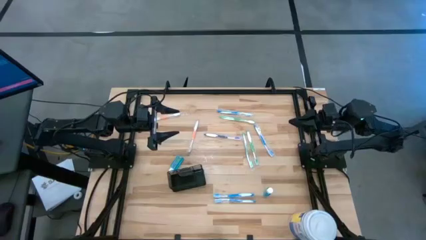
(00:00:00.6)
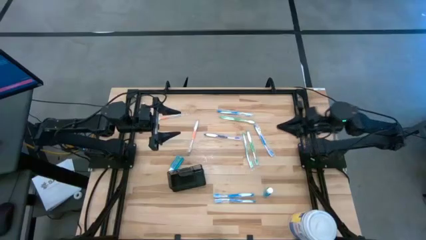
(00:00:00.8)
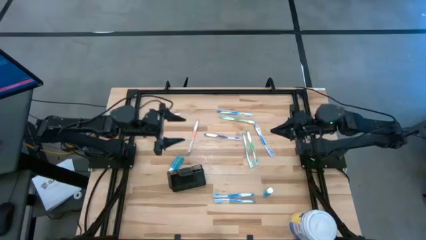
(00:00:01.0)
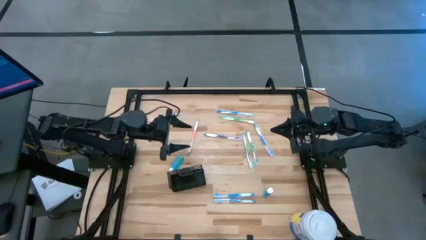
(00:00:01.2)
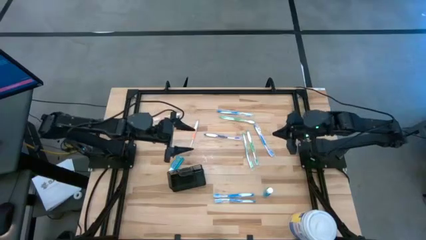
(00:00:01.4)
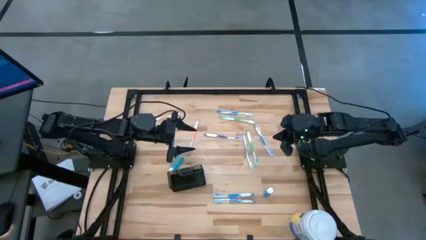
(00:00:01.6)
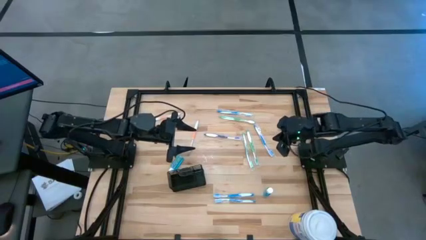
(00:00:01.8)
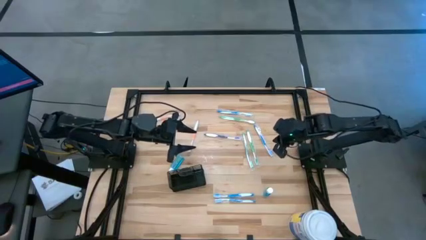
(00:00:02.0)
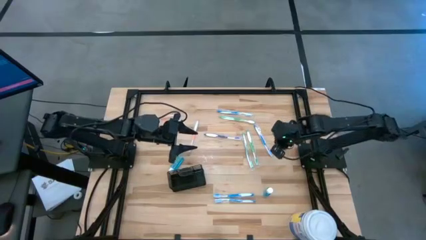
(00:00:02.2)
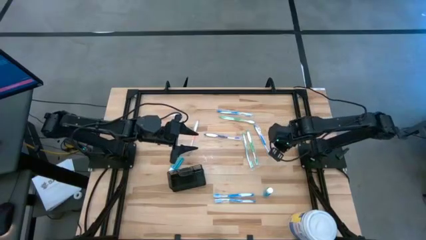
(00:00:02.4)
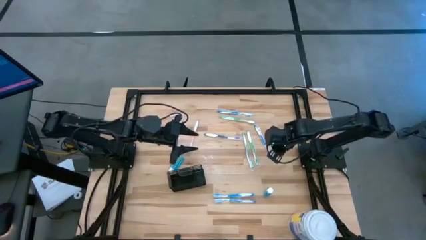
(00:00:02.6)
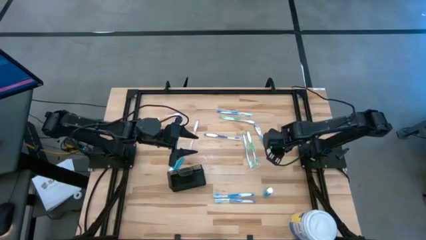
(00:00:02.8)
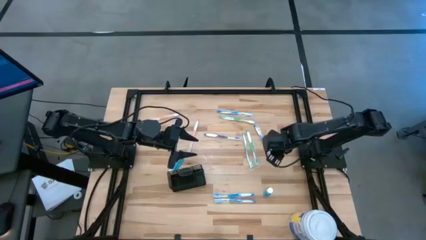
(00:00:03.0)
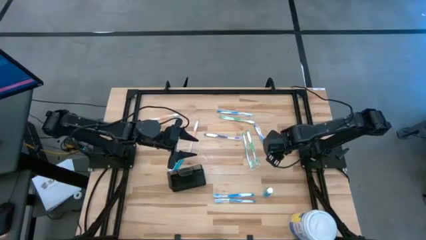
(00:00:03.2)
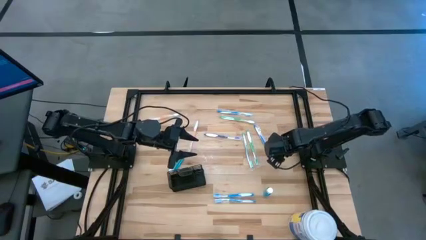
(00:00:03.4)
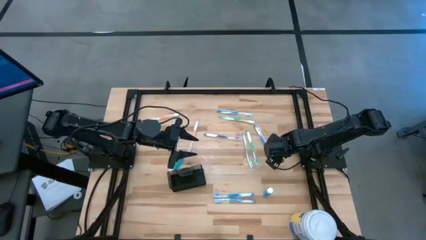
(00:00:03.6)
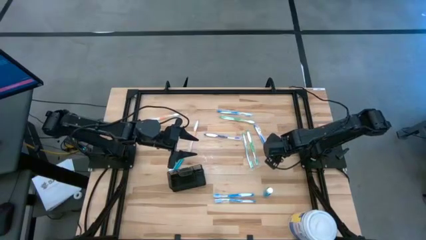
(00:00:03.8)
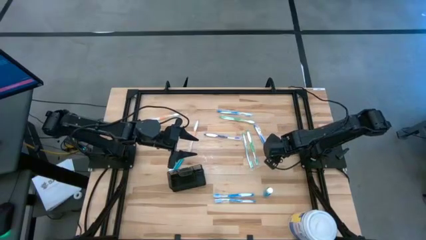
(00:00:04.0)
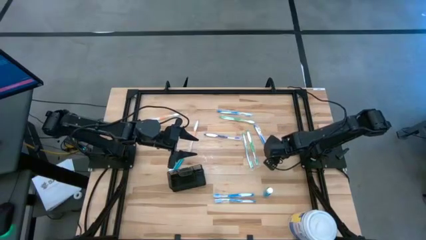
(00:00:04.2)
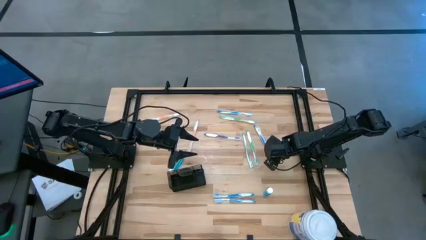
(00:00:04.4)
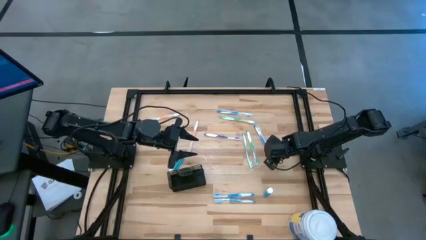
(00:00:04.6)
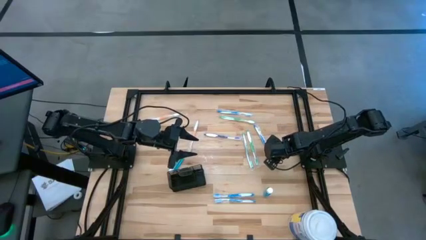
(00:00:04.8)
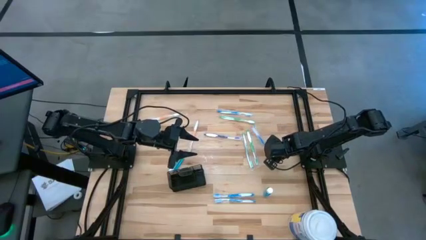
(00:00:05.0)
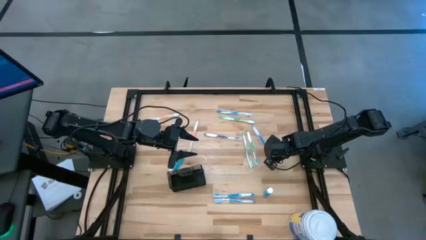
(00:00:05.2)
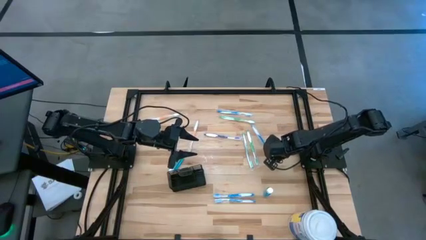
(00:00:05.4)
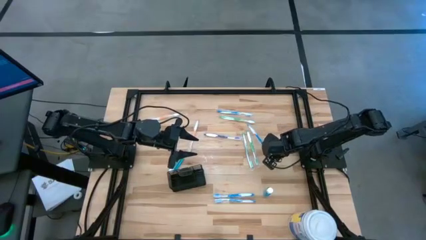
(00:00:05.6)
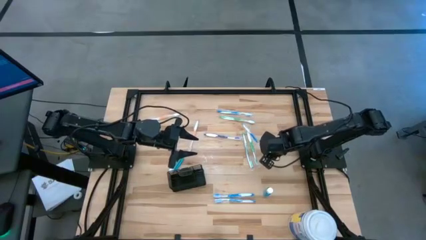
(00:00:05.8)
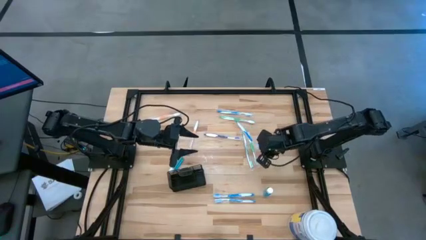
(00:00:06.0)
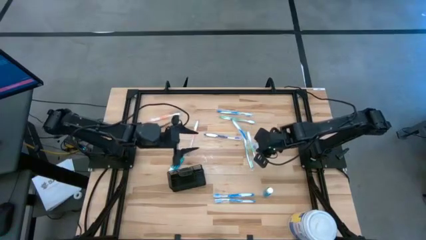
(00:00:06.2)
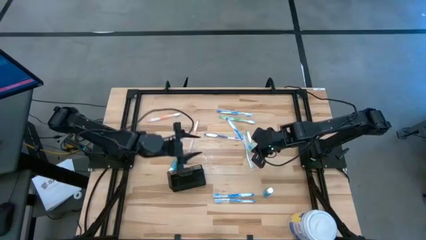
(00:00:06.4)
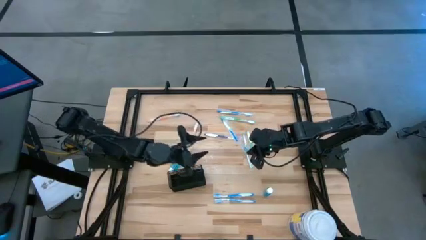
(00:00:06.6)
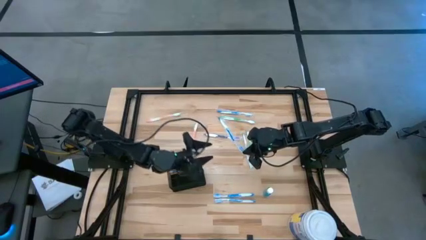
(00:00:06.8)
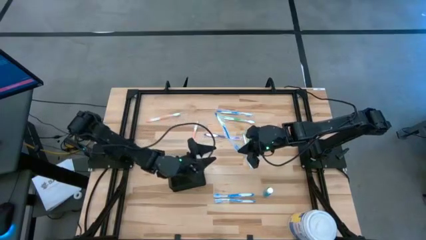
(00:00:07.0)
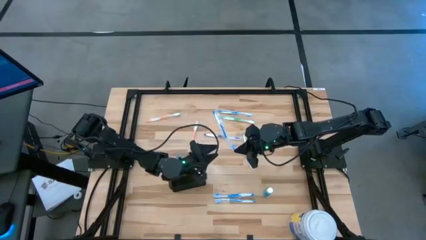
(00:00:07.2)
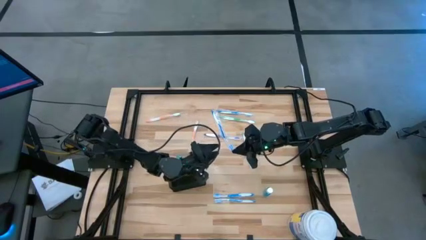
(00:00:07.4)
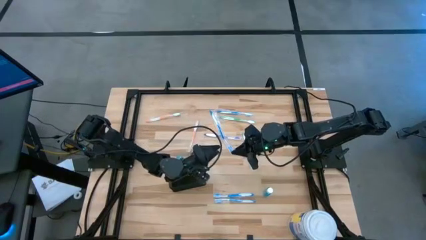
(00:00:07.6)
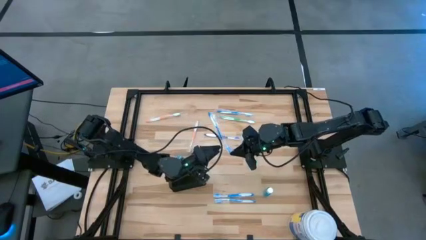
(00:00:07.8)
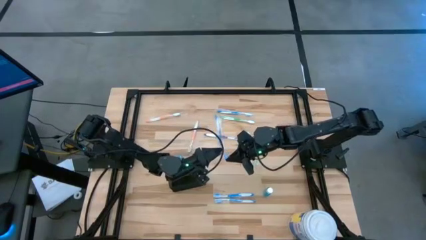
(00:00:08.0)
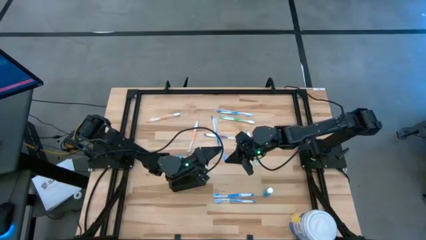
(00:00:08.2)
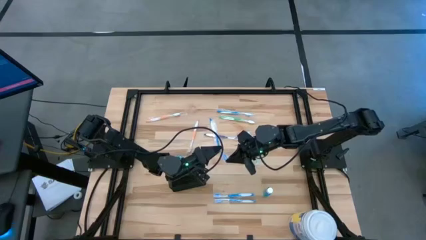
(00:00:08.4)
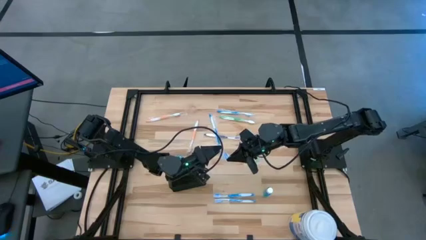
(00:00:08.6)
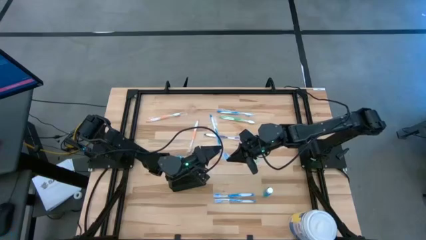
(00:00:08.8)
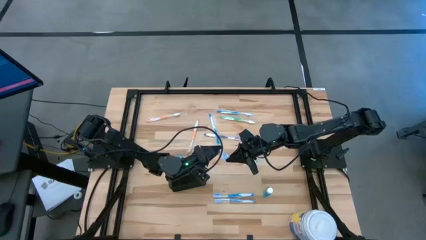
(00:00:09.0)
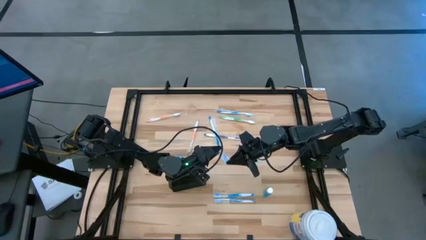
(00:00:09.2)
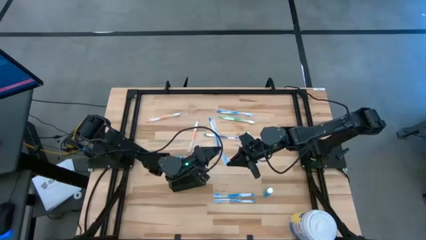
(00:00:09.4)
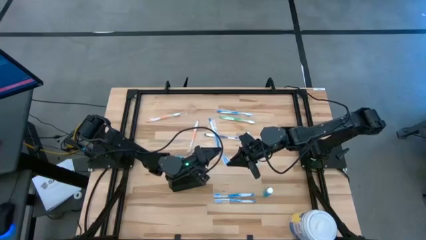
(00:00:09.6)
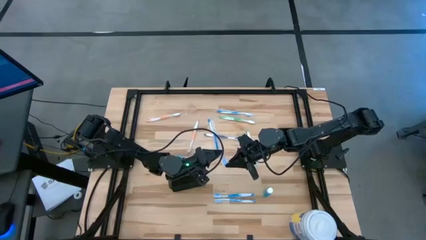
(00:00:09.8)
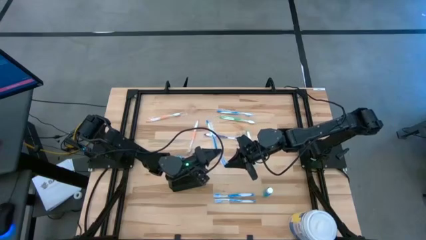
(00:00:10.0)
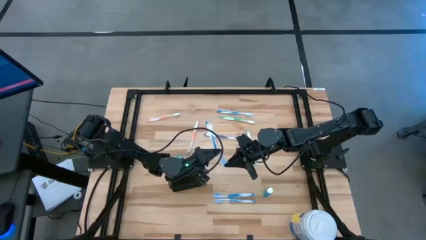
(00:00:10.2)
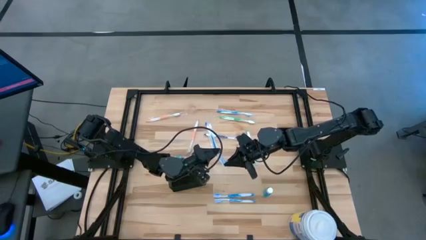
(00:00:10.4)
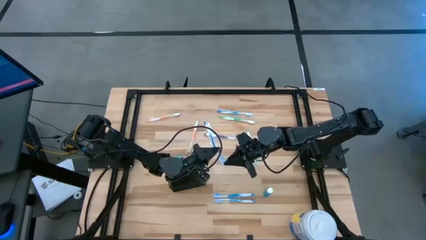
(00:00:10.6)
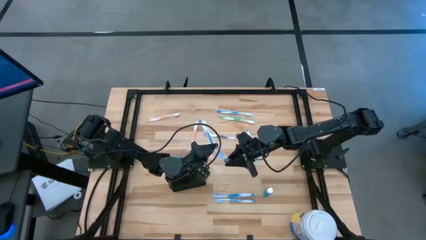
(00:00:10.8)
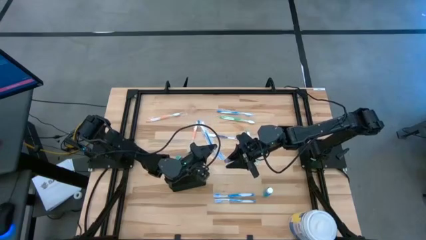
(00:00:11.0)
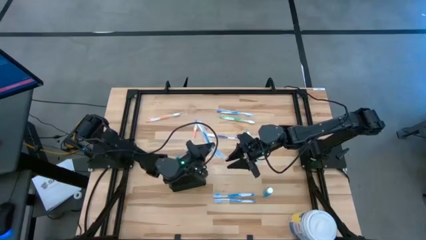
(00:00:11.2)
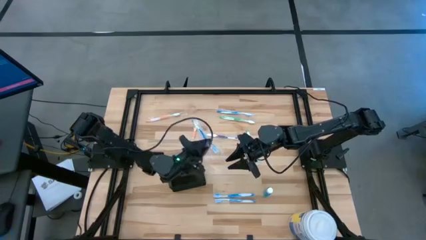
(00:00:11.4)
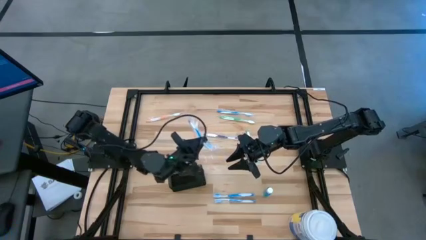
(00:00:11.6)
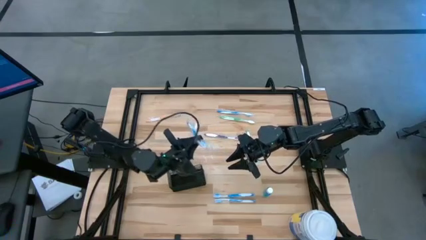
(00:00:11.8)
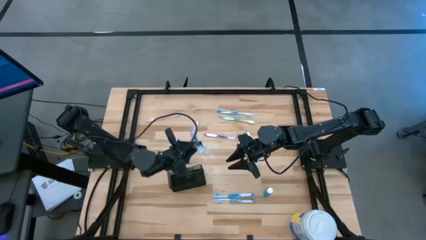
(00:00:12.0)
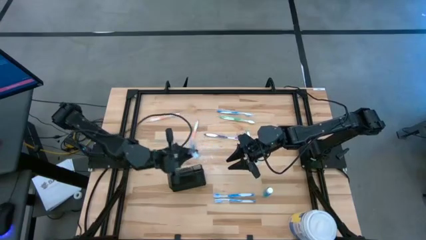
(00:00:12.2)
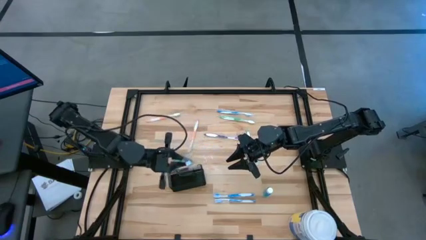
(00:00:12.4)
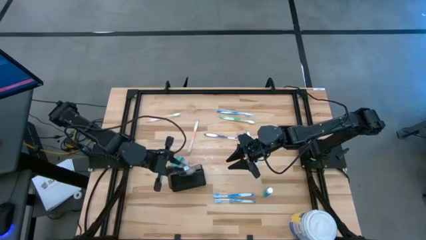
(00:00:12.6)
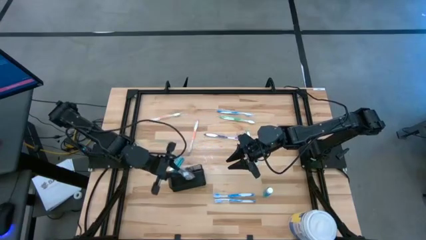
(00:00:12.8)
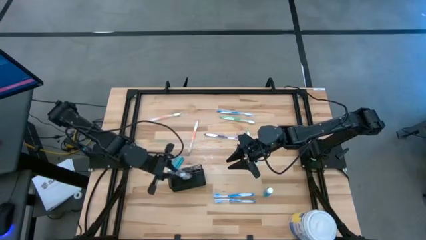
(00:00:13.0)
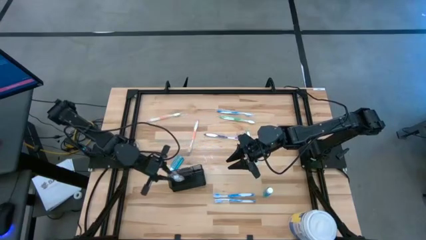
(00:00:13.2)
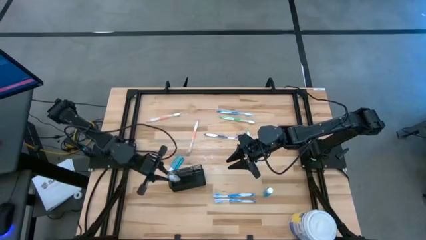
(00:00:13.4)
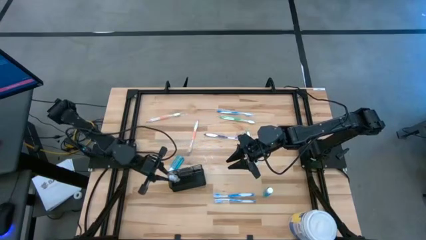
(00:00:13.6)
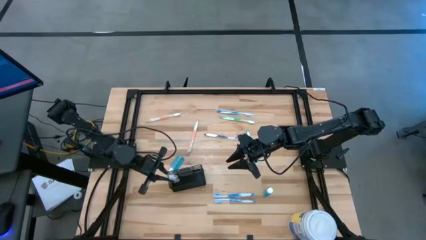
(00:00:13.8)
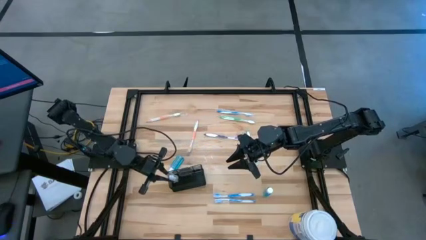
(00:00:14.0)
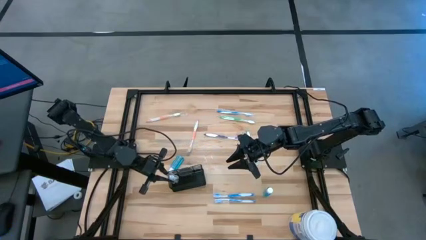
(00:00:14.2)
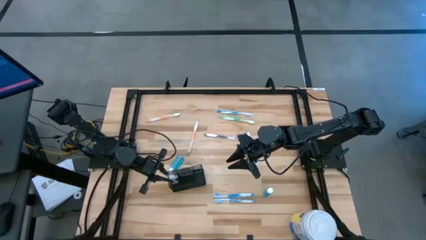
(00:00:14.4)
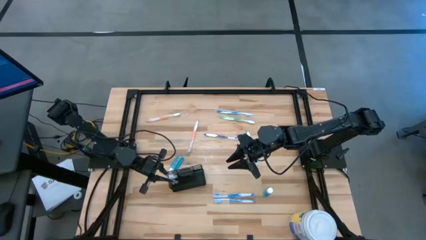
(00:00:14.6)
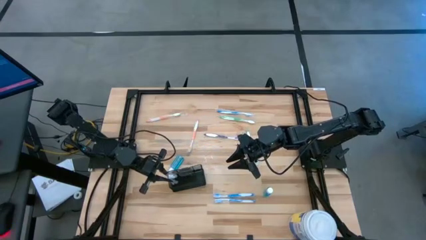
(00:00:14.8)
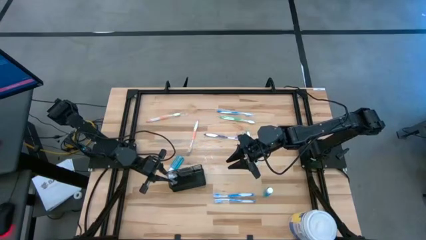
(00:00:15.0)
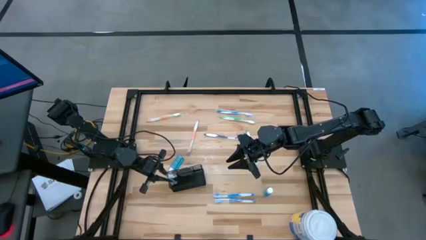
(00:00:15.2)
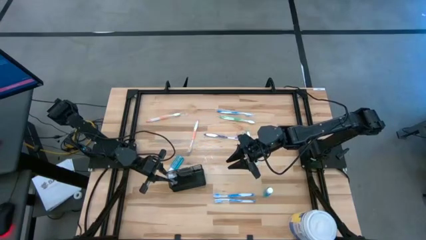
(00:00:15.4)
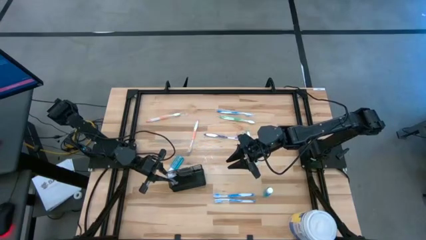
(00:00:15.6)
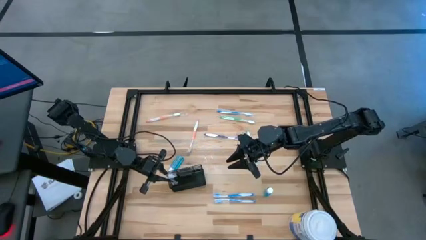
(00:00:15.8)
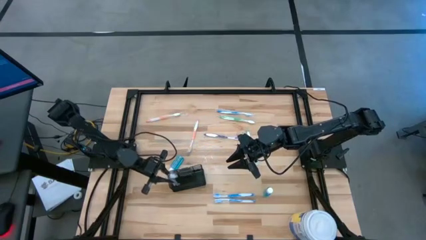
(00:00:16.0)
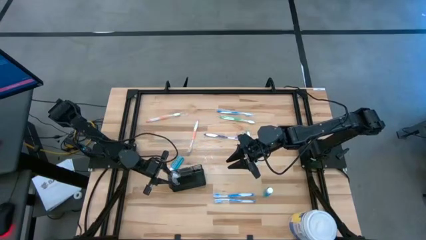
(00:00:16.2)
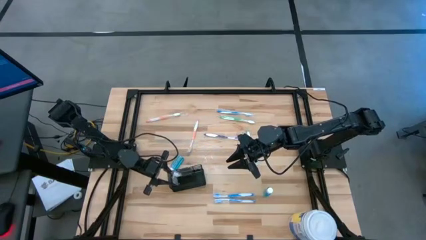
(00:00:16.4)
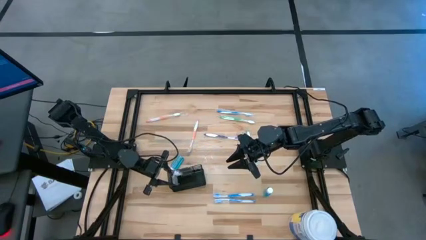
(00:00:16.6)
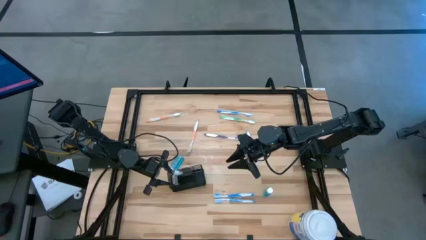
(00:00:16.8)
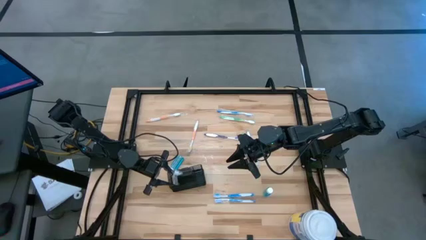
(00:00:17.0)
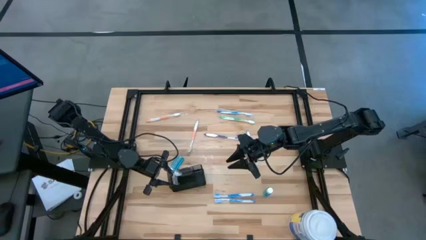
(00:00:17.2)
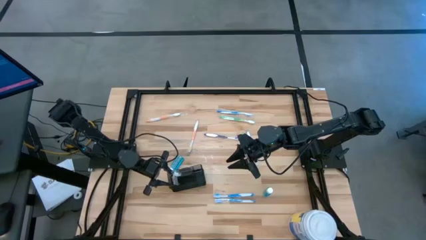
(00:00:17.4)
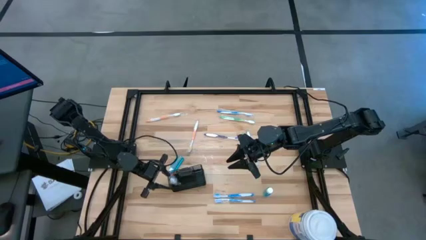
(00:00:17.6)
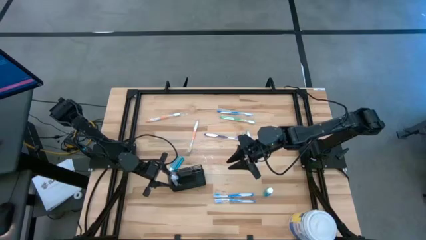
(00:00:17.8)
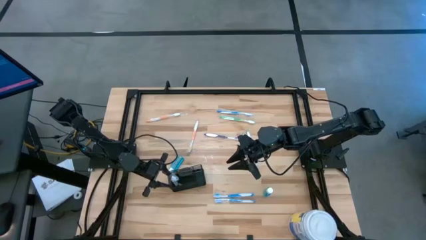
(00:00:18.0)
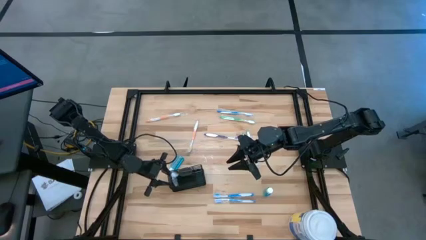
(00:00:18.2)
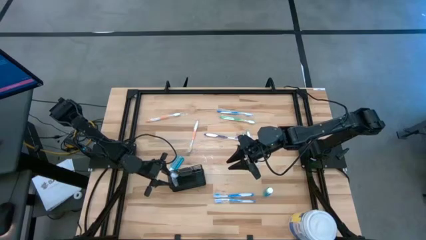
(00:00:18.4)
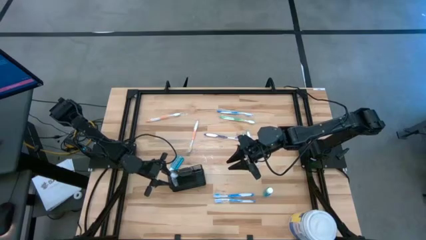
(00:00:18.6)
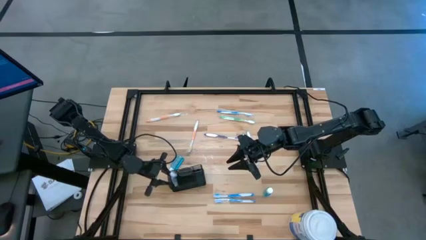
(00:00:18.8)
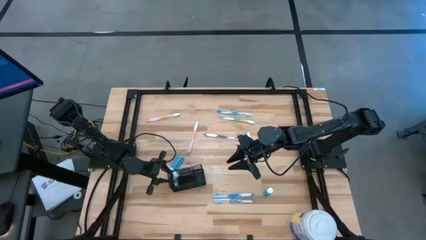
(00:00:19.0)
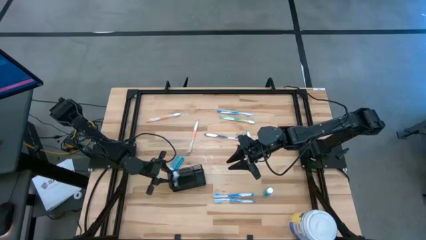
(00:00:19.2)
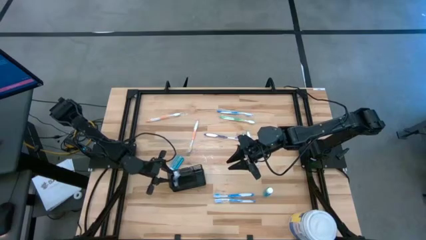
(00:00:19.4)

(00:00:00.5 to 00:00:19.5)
Task: Pick & Place toothbrushing station
Put the white blue toothbrush into the black toothbrush rack
